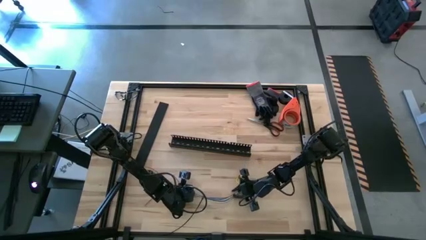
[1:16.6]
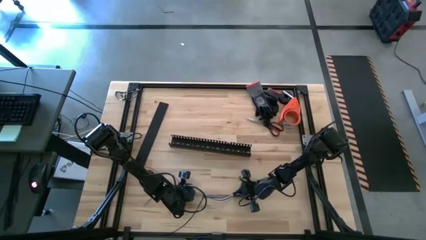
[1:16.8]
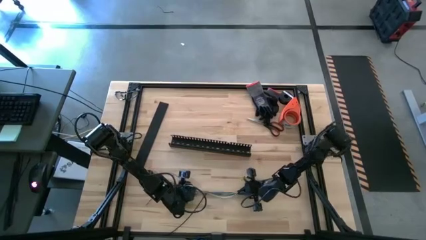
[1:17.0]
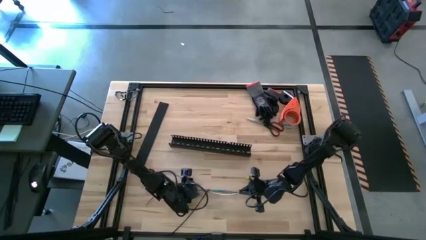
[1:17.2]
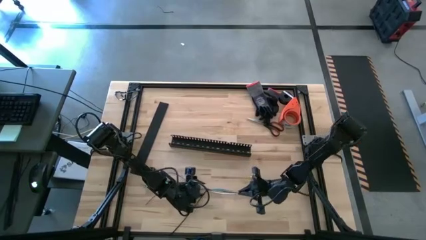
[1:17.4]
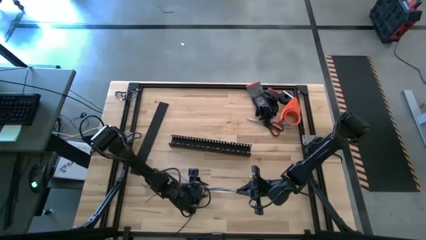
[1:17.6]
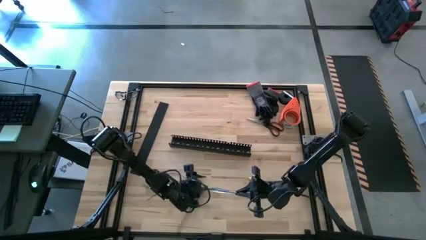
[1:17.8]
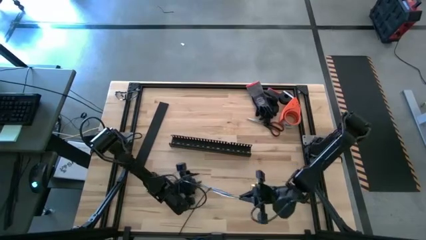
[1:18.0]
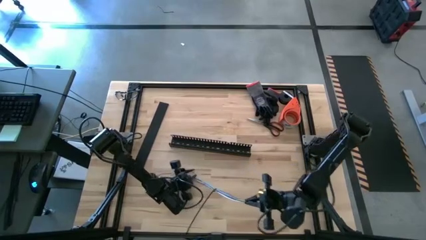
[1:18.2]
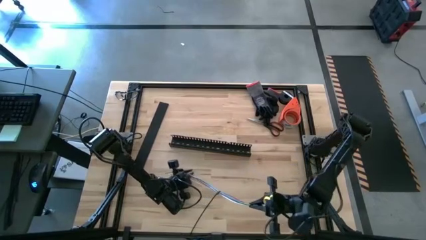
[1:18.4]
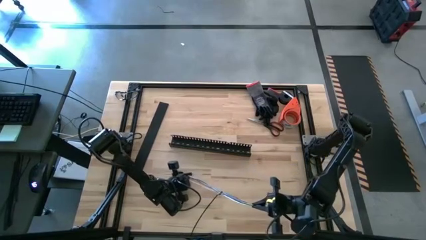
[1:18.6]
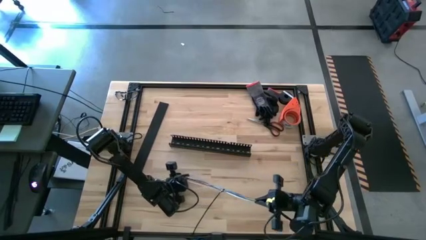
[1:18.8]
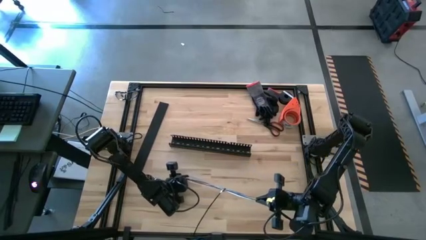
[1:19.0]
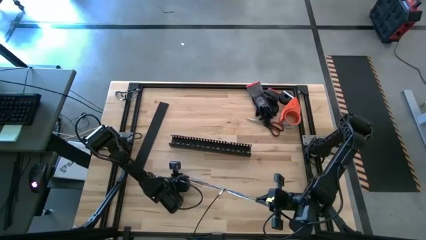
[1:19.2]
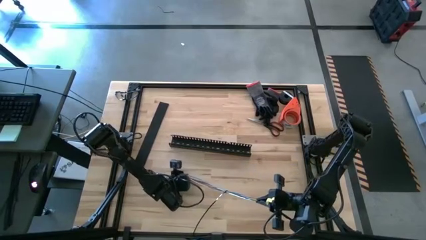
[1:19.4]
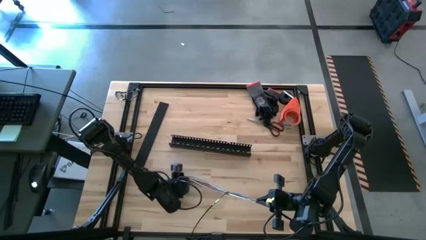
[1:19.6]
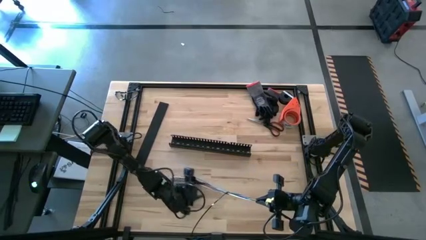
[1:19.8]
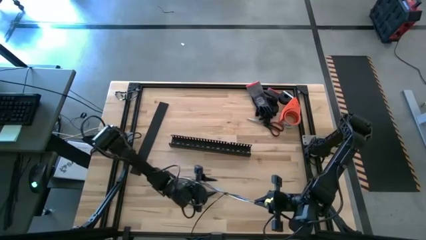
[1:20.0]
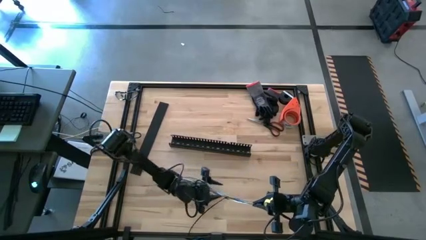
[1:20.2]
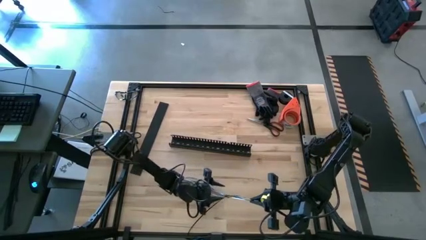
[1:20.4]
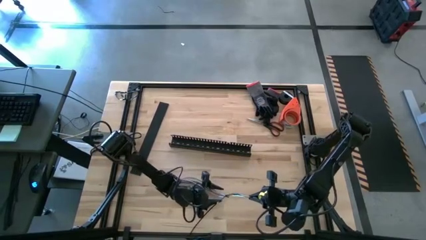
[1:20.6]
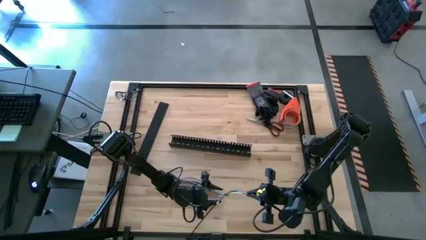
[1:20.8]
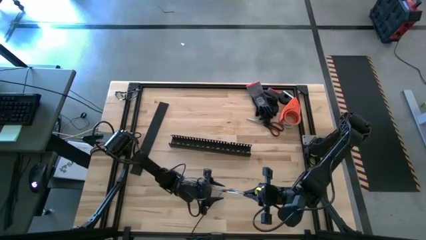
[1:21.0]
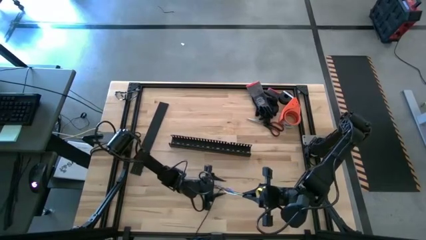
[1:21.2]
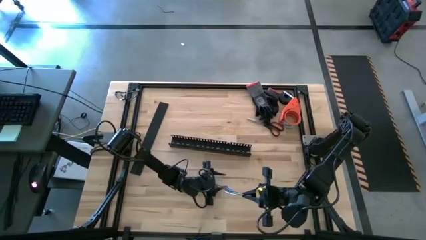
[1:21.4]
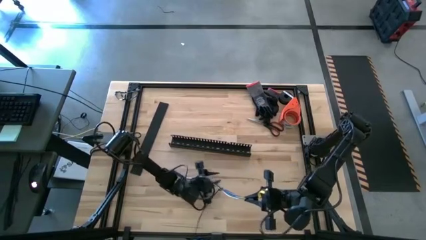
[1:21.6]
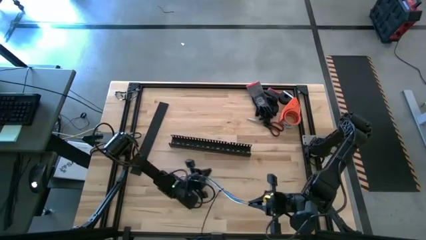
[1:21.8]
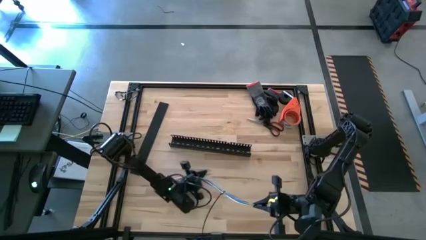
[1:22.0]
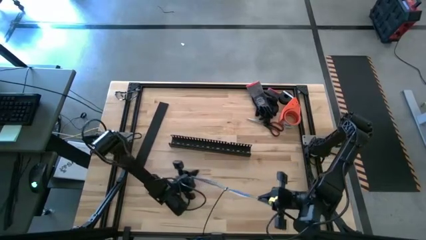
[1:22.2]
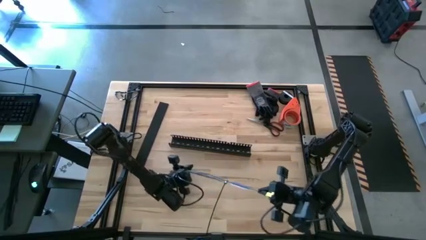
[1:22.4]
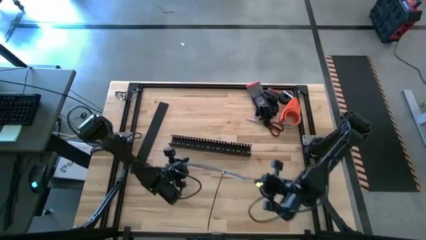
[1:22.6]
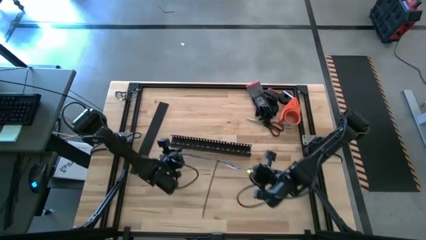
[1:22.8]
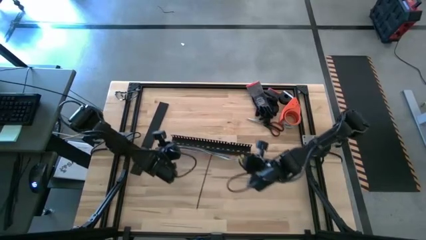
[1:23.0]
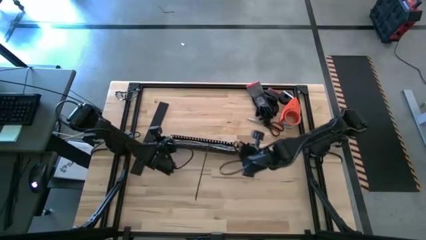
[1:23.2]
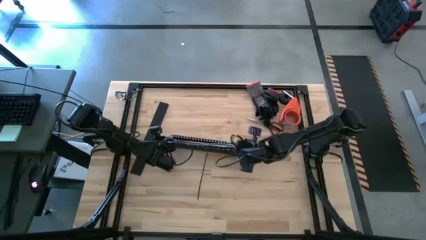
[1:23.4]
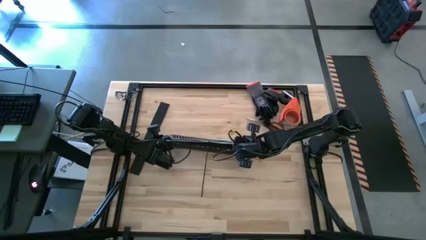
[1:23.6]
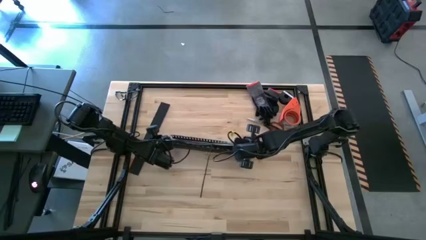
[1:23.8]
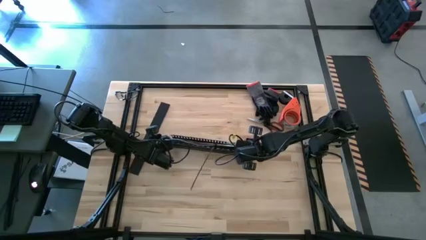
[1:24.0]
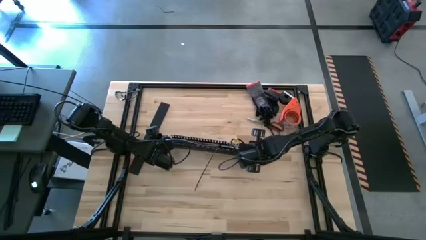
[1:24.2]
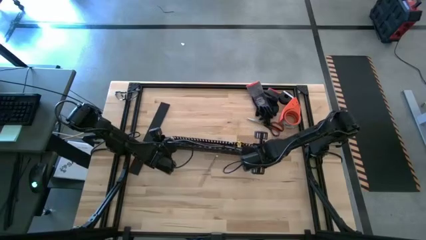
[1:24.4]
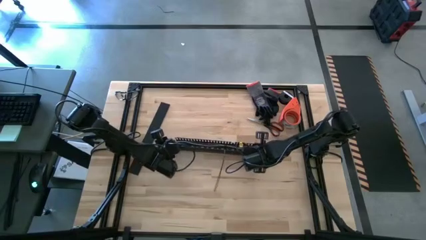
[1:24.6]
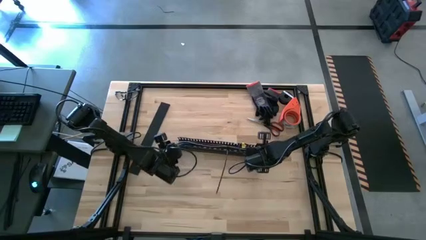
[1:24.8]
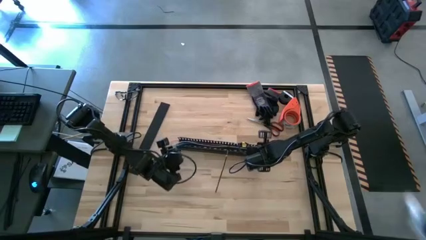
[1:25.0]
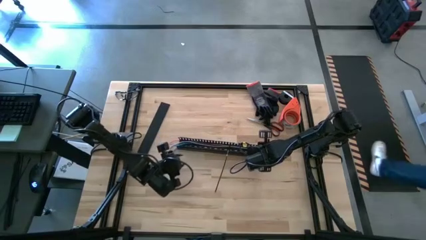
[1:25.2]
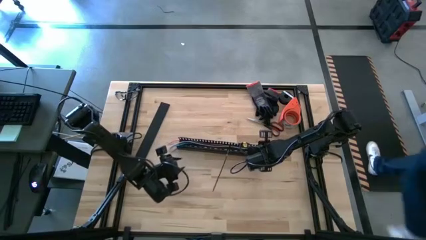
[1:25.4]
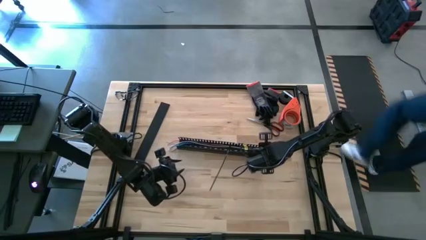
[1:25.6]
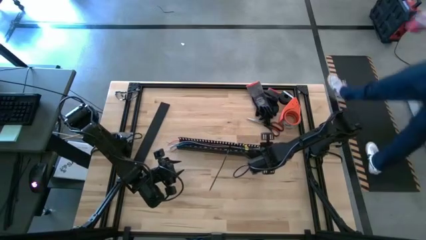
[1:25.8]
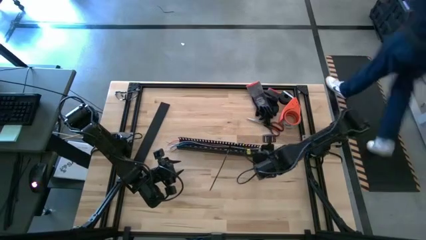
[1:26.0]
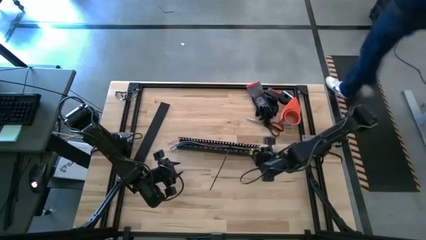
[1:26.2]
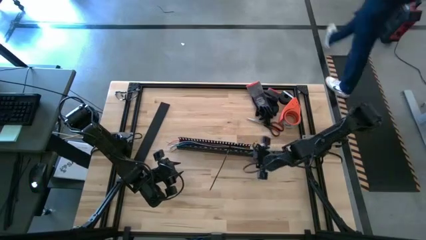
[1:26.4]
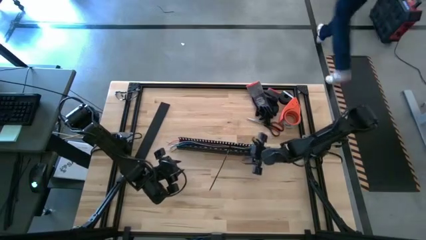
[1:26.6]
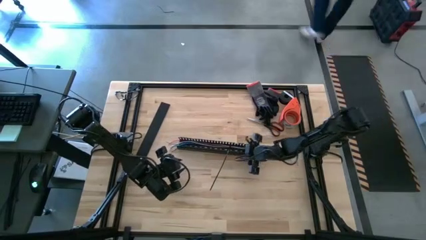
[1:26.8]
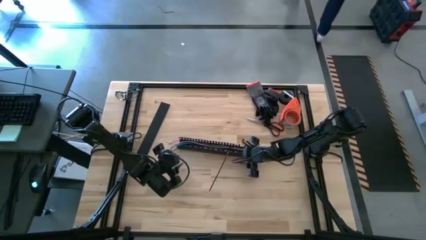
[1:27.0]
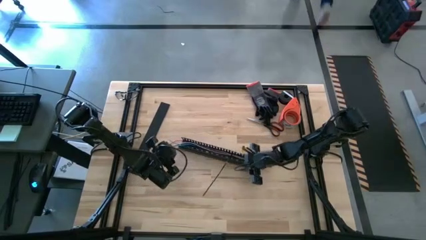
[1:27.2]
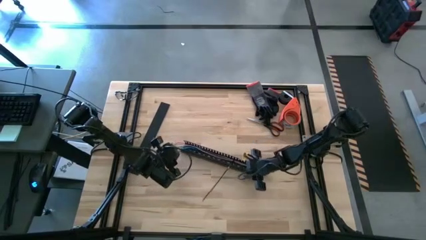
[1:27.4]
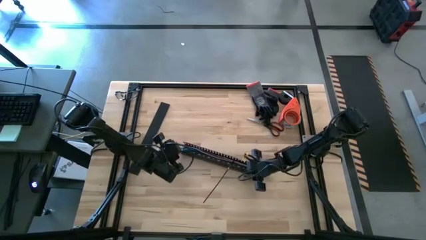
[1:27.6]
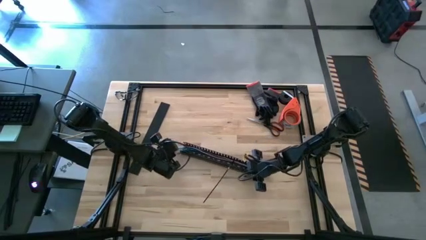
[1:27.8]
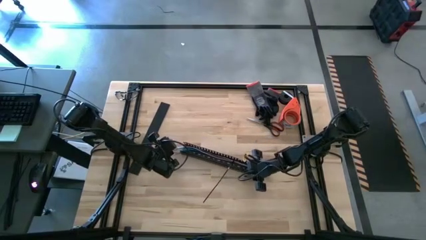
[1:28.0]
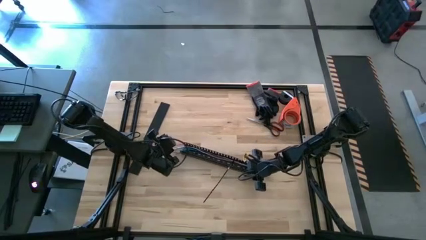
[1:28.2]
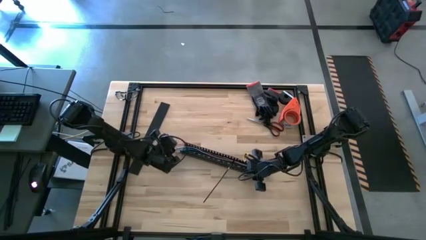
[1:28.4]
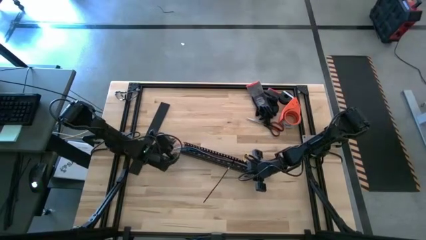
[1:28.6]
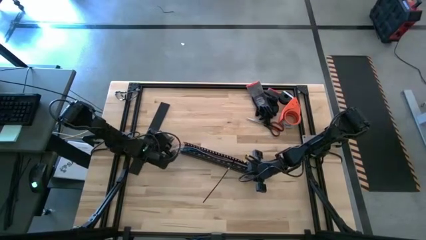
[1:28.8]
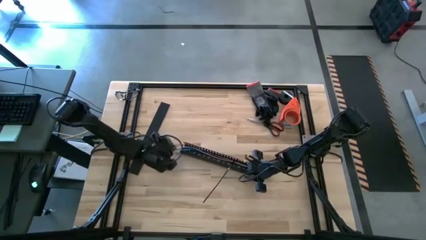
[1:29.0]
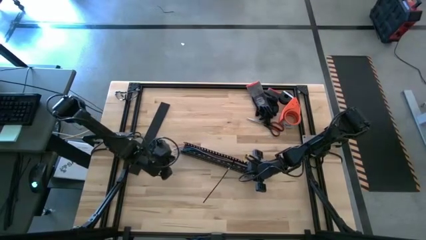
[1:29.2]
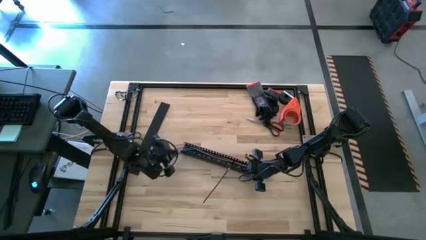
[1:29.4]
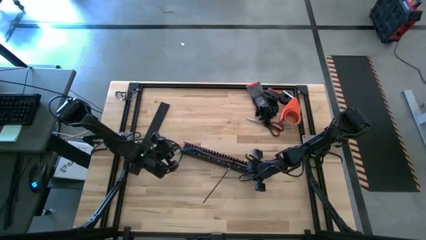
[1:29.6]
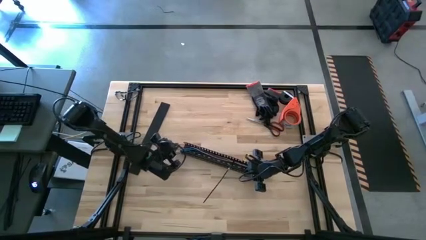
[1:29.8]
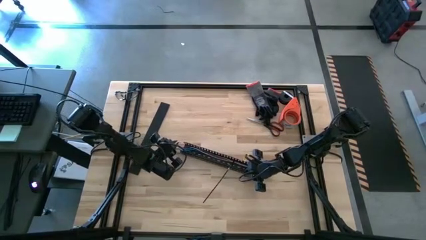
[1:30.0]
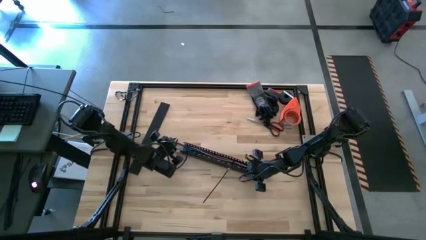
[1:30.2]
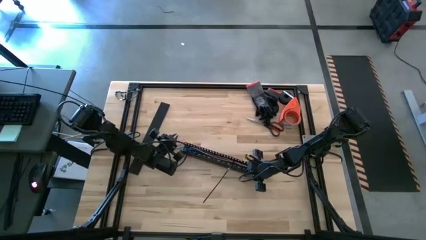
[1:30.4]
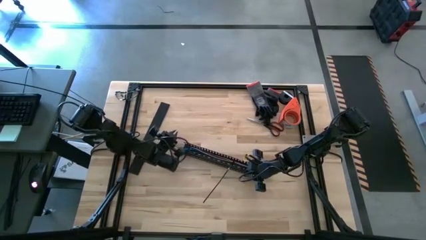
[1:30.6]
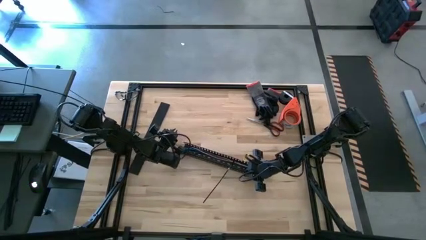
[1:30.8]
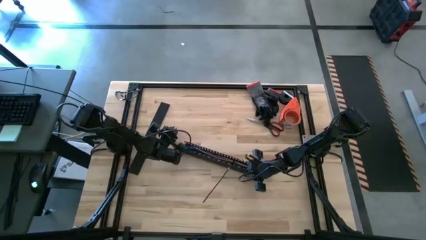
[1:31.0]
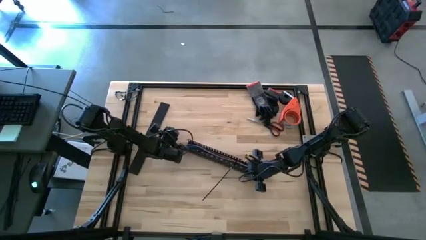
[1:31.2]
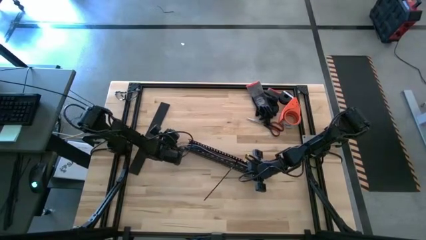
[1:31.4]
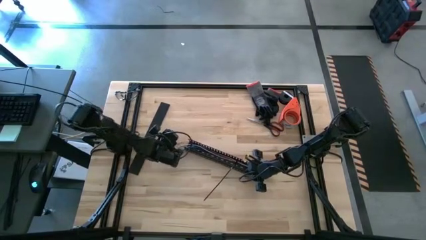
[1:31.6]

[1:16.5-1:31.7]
Task: Ziptie cables
Put the zip-tied cables into the black cable duct
